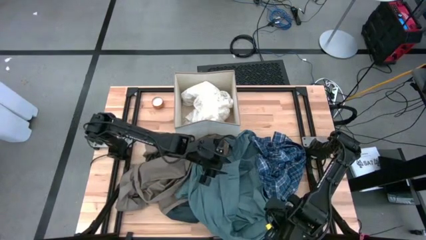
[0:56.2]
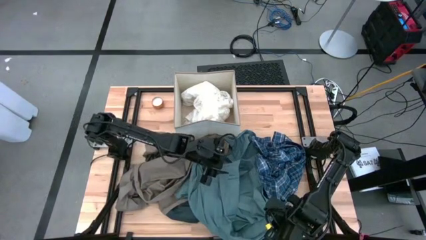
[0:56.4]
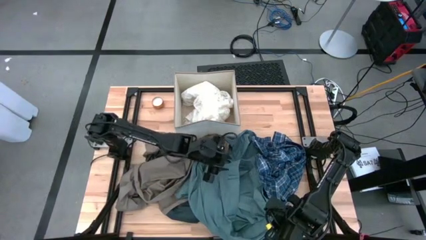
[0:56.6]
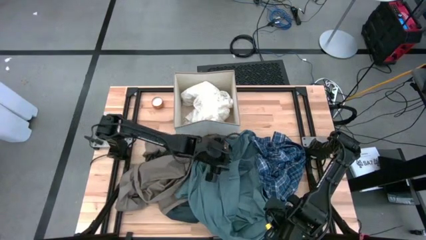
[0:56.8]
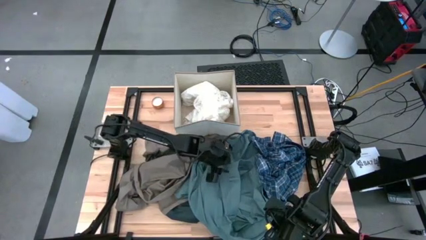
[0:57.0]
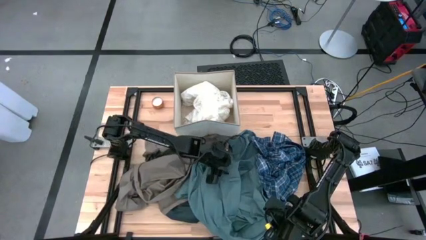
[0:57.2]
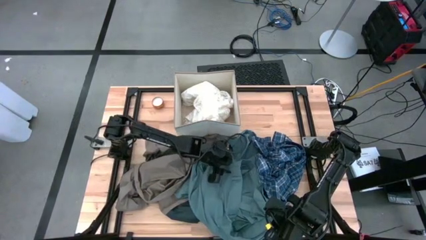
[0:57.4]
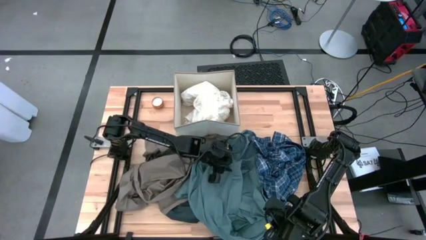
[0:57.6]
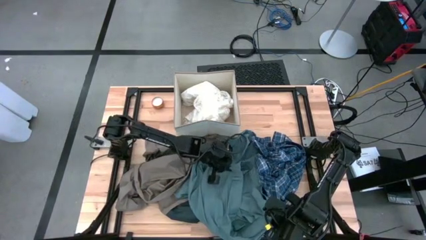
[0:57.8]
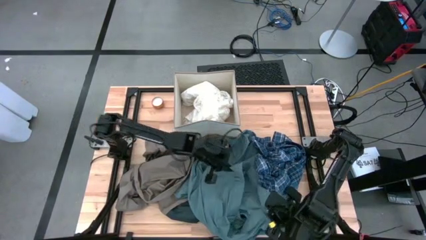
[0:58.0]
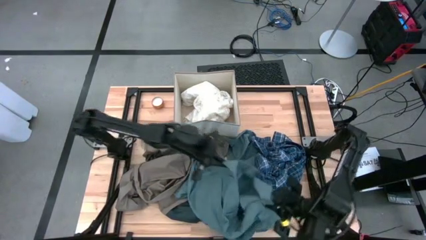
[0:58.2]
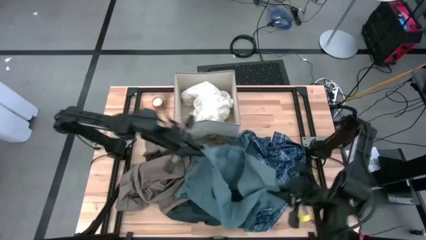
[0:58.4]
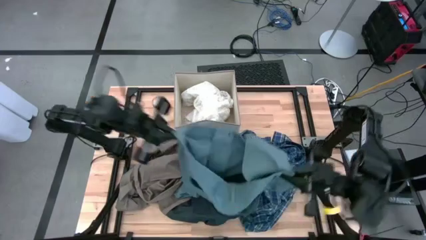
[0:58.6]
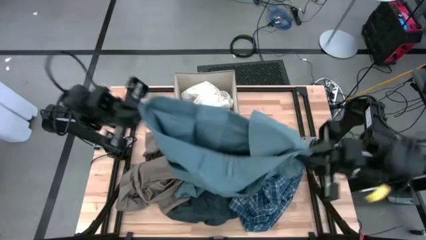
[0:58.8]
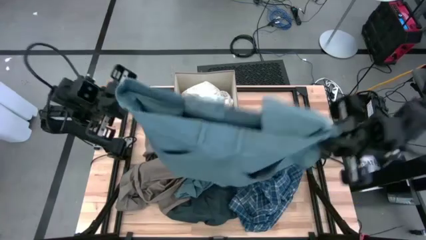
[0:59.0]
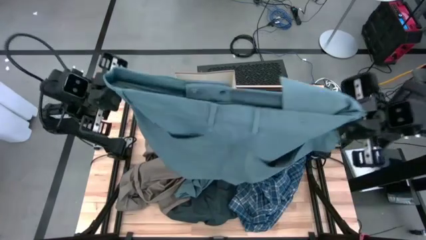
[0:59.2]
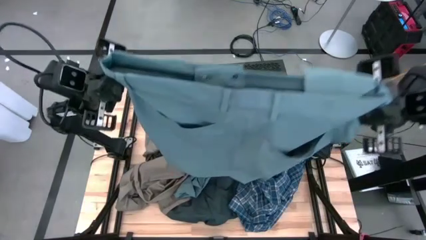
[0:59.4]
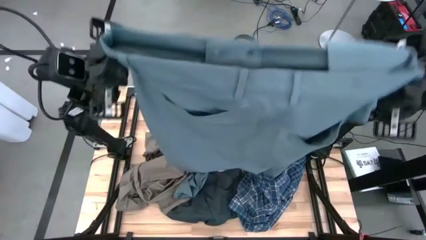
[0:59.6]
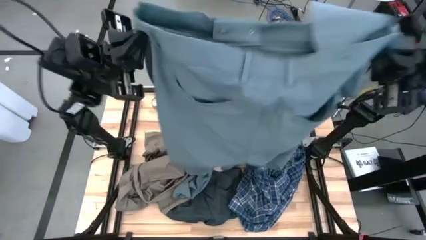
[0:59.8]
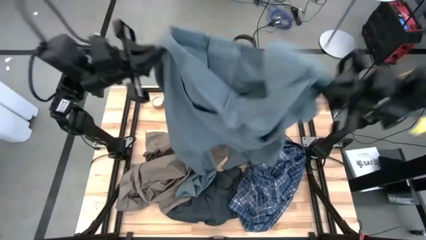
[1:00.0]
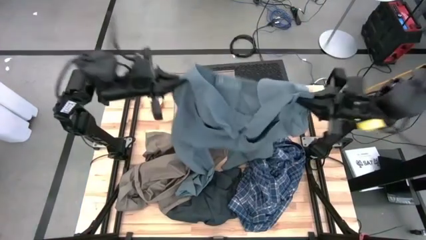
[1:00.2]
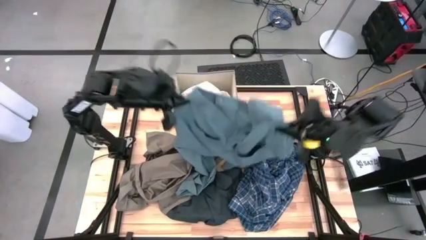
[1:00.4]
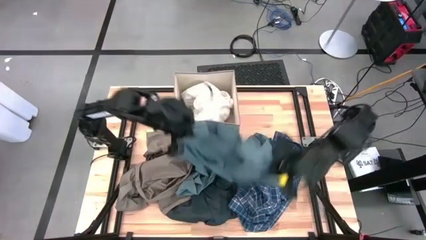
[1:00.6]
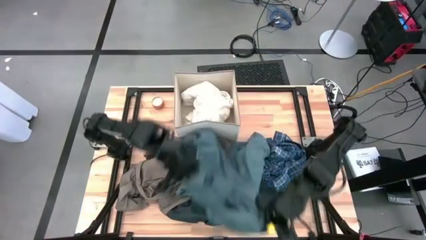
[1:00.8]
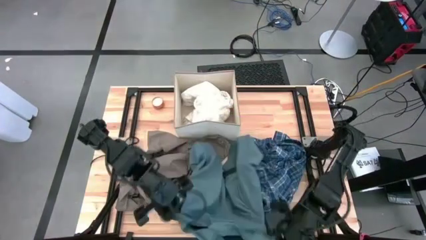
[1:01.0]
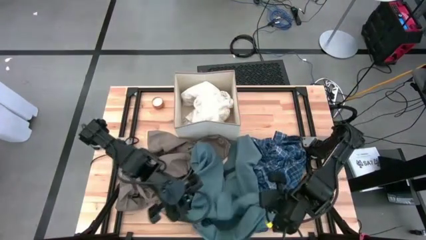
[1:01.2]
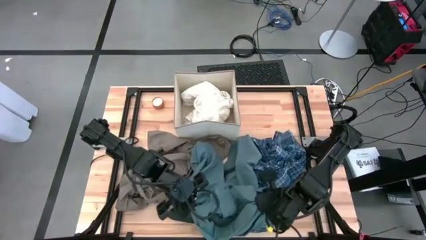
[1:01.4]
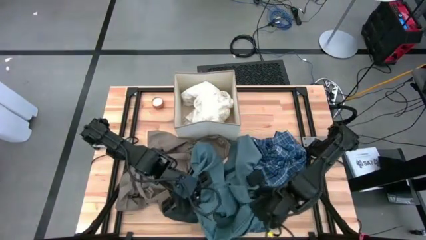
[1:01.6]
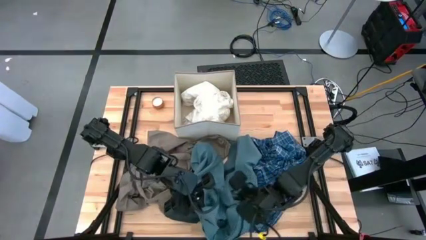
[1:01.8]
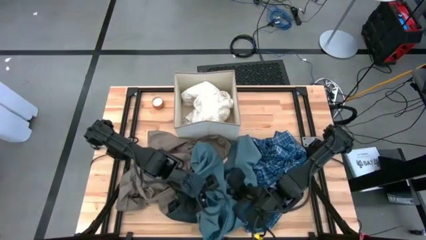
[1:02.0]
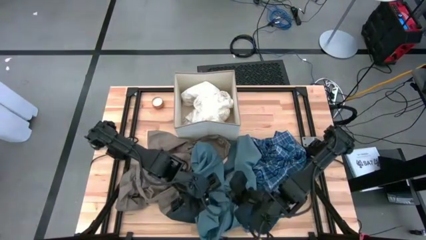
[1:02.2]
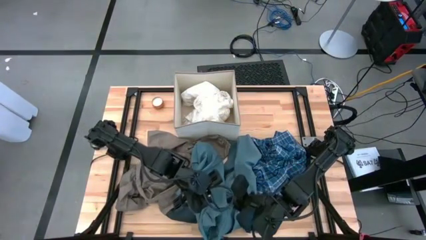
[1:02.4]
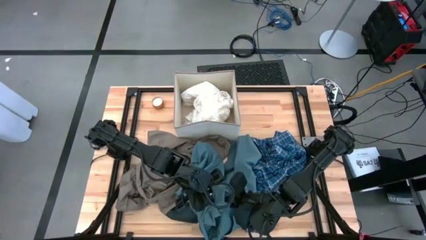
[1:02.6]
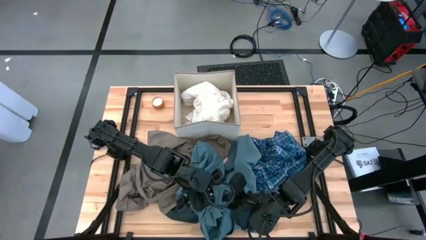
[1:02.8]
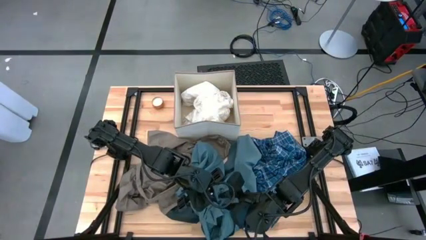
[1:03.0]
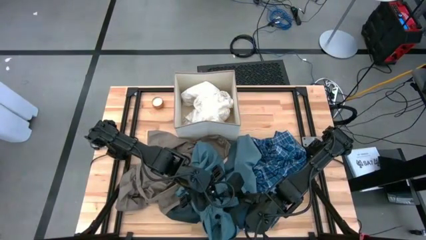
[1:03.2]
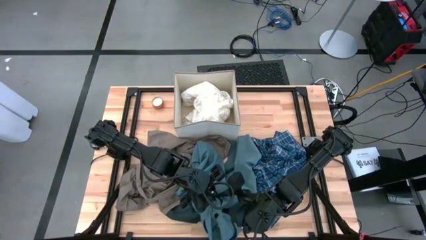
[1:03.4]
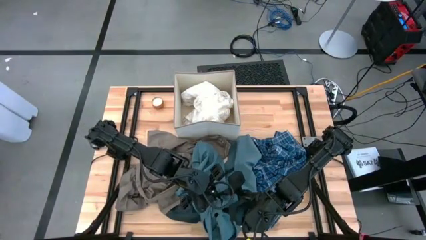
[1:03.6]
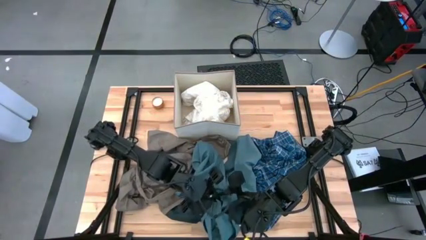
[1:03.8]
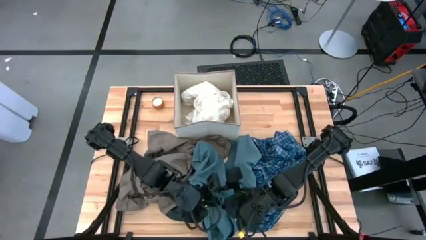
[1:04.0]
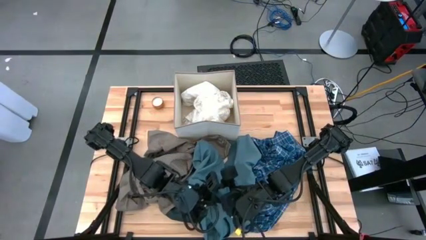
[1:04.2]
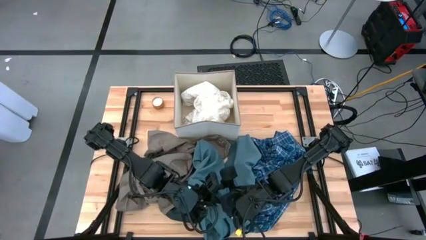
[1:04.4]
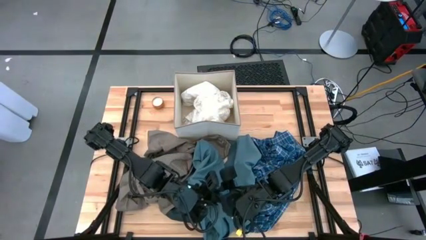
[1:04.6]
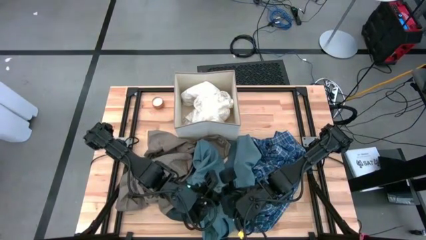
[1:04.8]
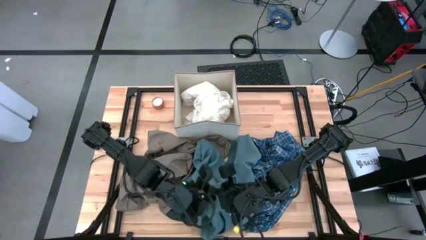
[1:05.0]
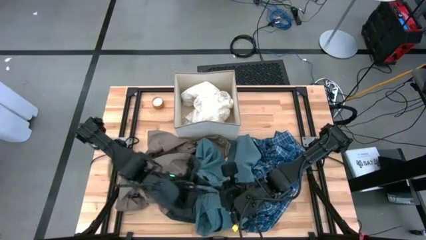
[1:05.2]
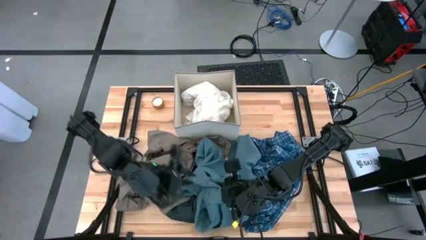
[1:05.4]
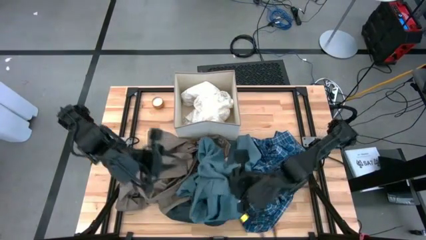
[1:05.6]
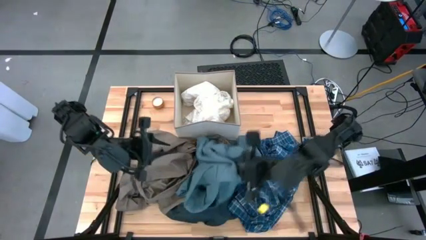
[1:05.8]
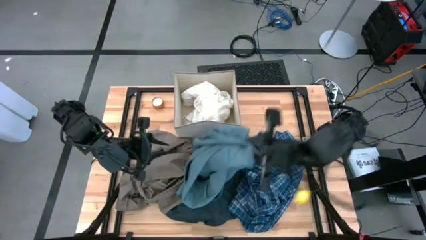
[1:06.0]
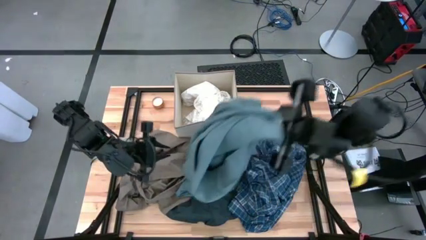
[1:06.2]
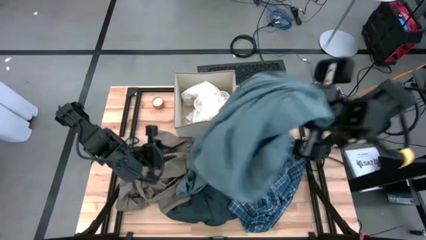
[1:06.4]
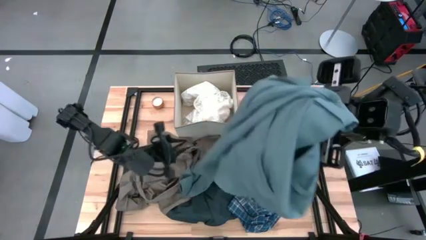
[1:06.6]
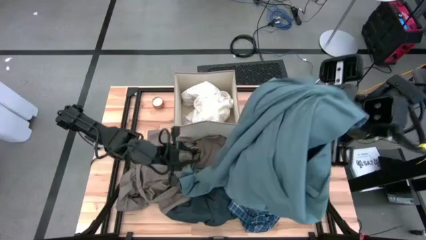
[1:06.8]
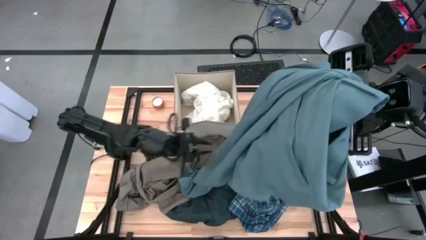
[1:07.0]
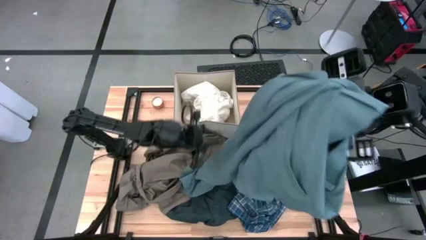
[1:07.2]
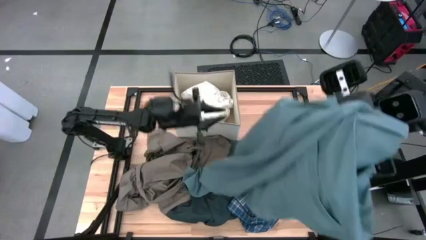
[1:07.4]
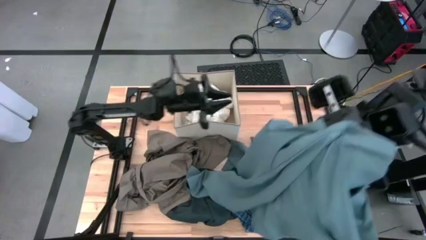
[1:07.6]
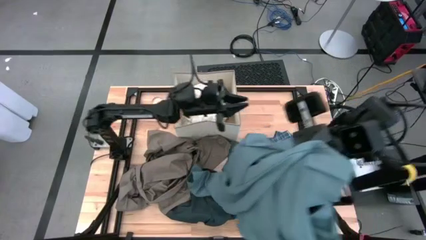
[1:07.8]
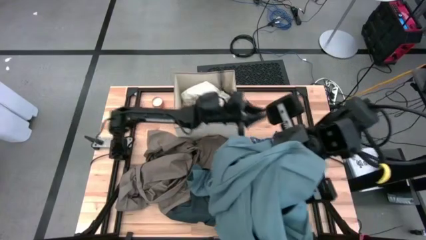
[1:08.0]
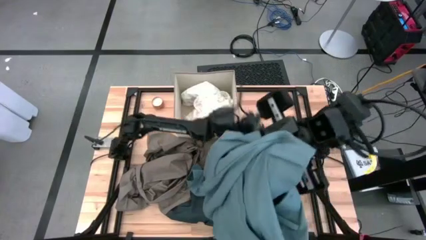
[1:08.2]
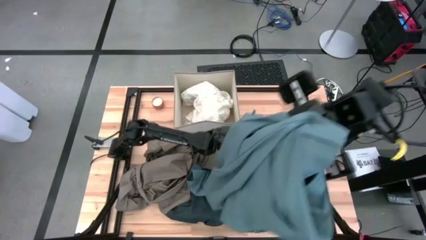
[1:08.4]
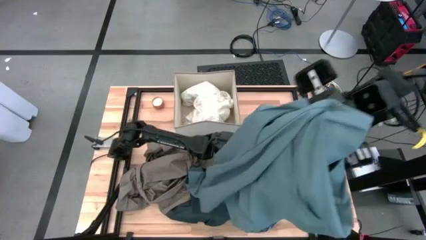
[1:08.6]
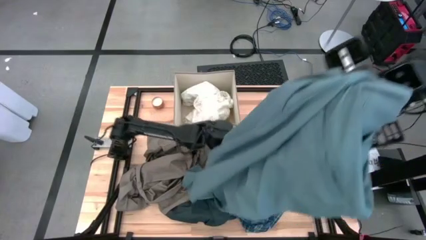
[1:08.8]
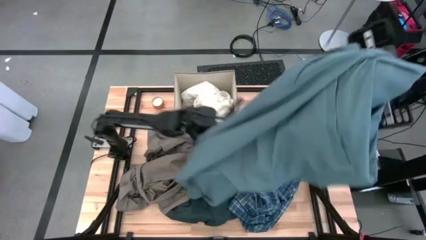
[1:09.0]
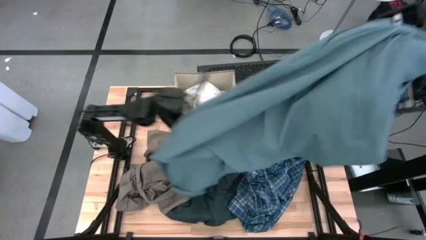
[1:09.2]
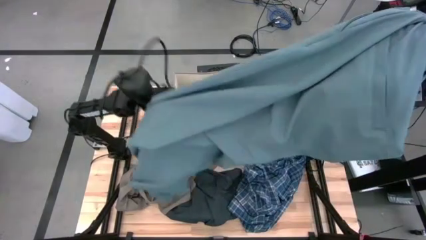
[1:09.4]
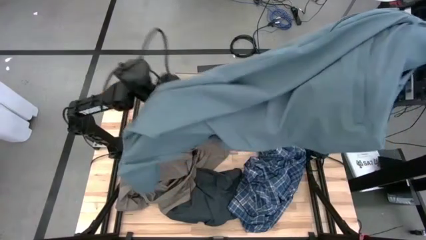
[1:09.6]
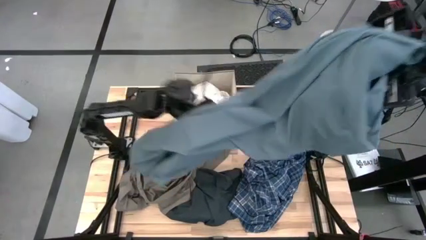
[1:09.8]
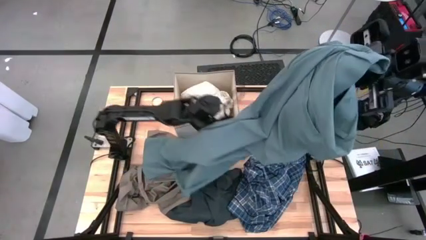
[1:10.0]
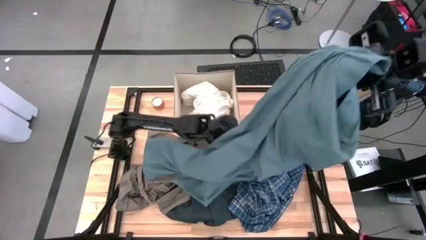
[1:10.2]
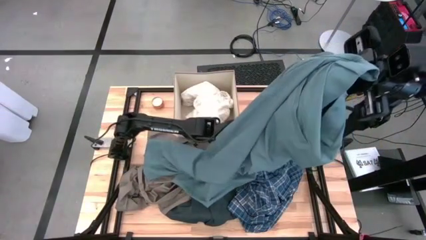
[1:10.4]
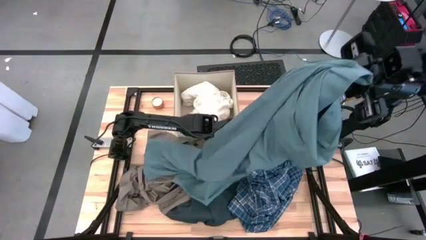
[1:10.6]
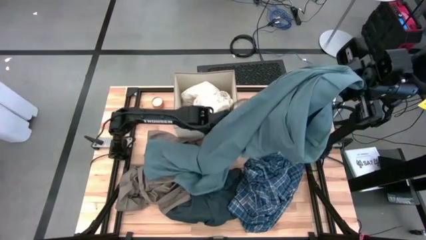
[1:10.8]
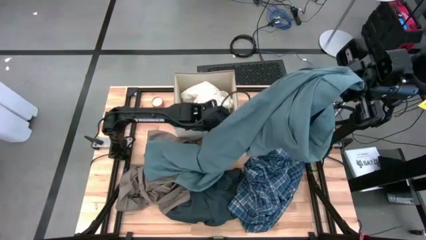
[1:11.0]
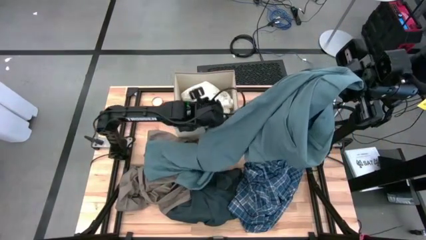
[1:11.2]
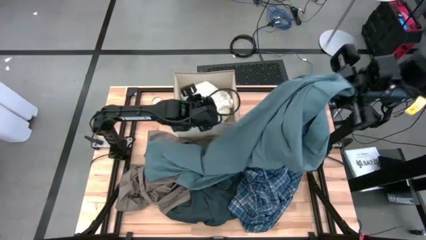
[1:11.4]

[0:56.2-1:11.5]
Task: Sort clothes
Put the green pants into the laundry bin
